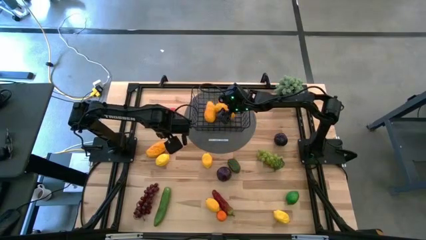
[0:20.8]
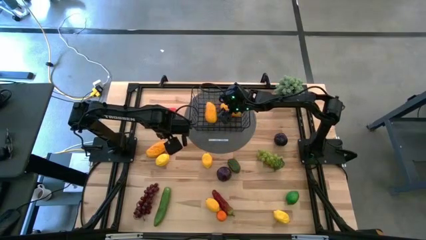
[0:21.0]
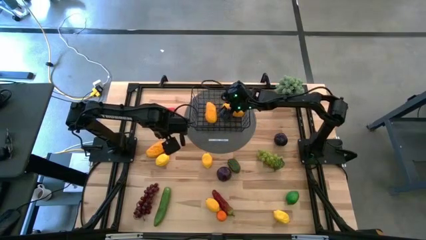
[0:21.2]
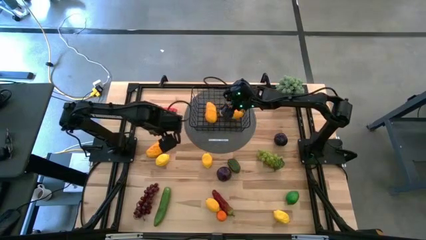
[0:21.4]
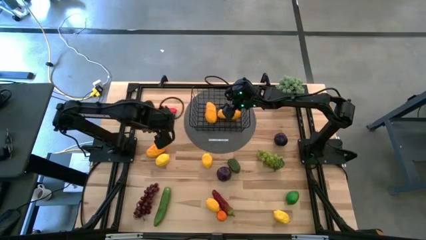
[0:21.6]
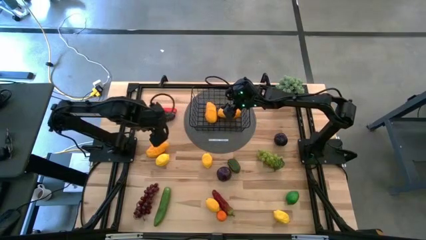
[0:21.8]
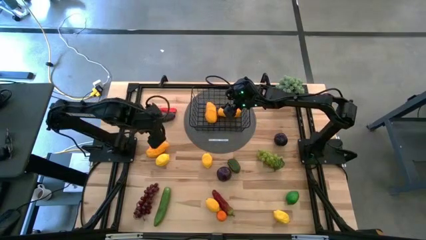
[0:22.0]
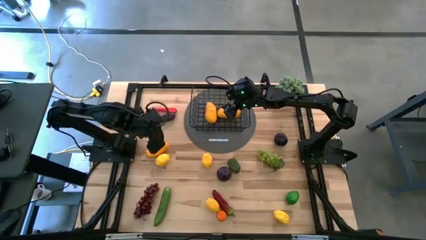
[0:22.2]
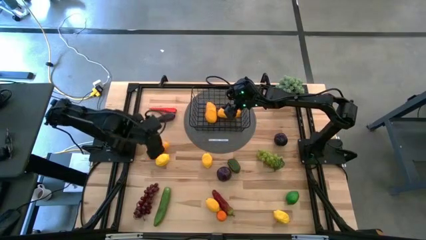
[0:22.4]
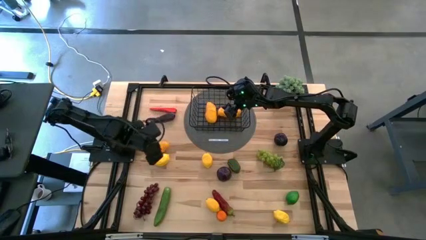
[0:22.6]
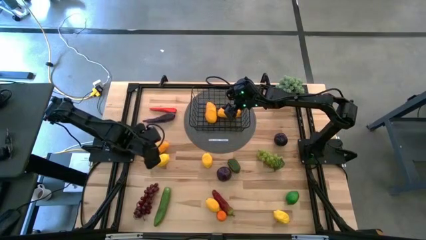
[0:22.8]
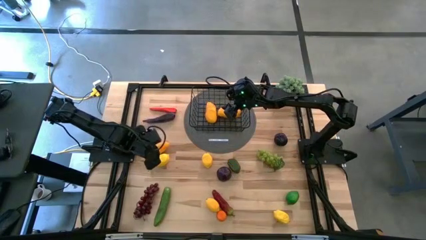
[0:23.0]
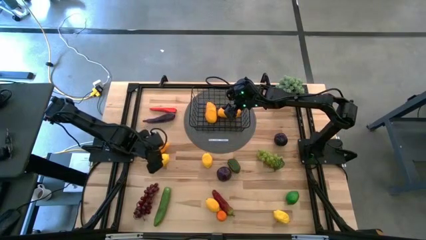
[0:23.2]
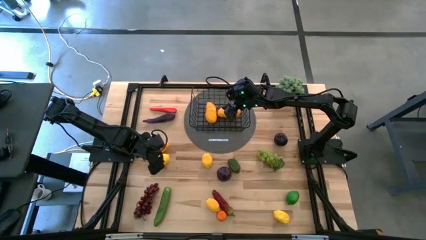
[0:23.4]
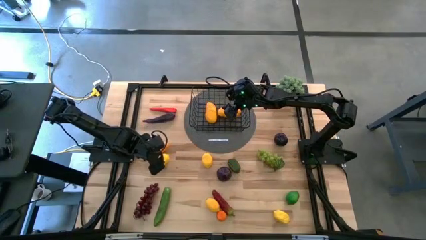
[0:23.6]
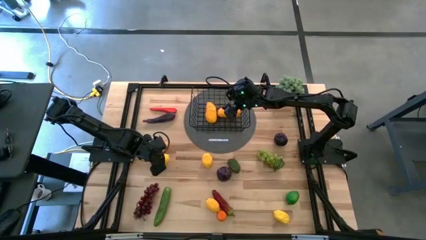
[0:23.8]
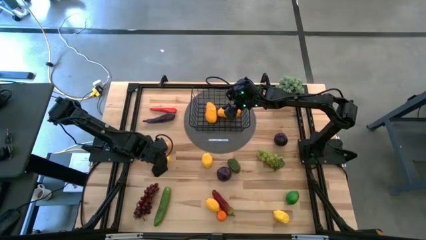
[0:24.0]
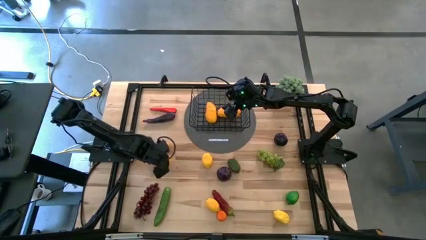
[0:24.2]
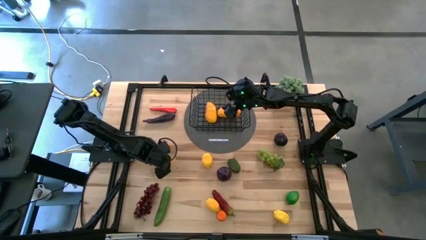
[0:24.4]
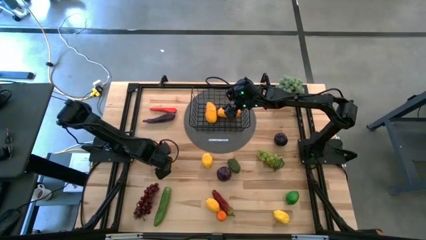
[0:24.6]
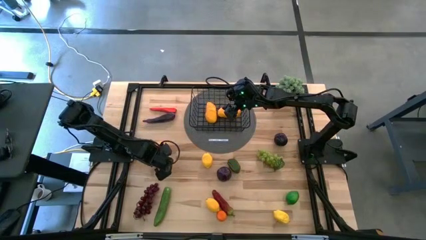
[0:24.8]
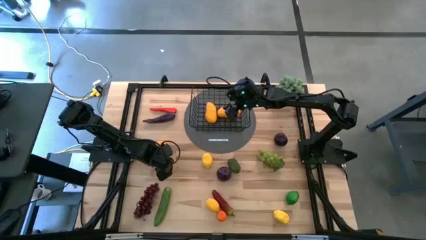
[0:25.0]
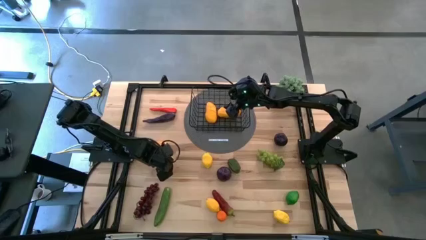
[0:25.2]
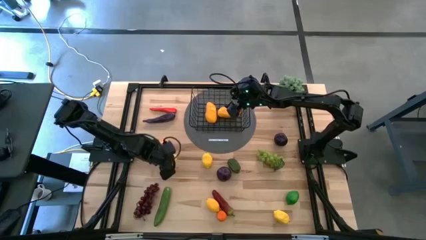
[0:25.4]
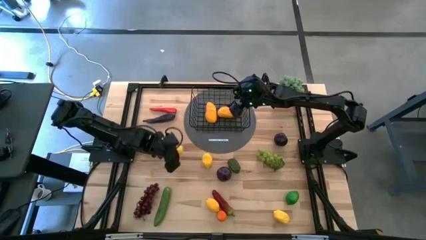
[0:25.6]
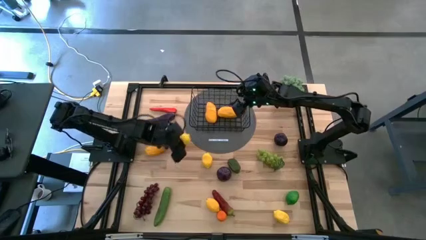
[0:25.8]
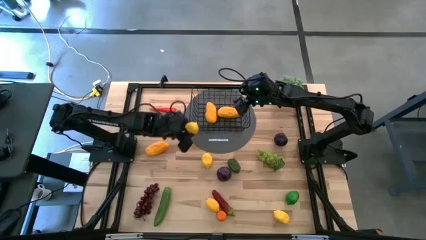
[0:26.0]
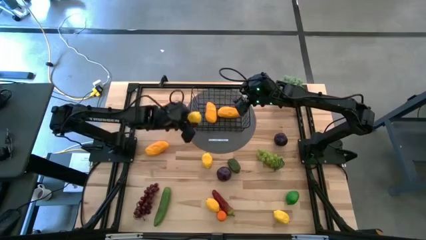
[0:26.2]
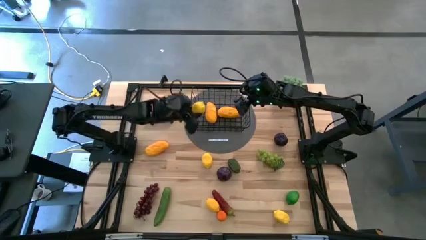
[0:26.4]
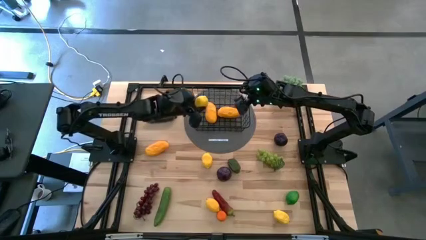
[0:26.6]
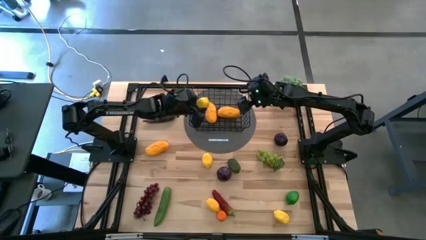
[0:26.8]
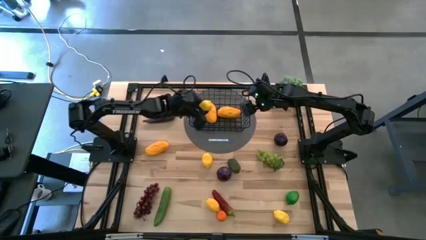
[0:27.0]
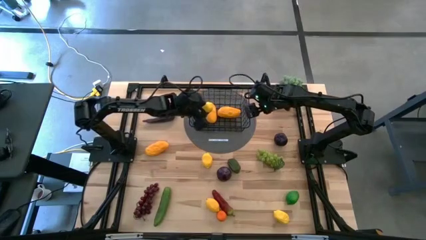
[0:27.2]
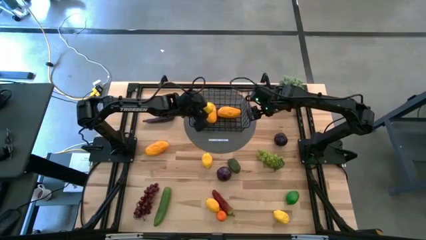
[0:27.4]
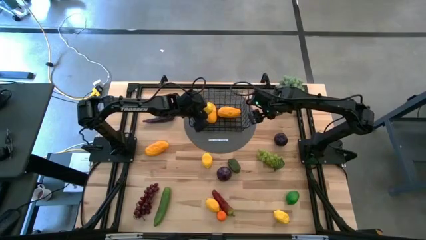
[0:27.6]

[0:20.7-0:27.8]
Task: Build produce basket
Put the yellow lemon into the black wire basket

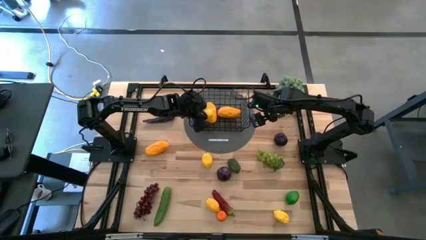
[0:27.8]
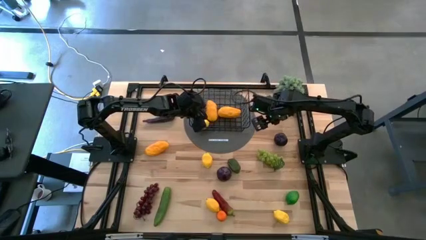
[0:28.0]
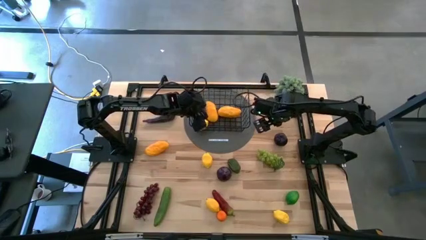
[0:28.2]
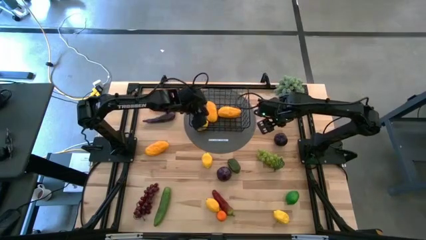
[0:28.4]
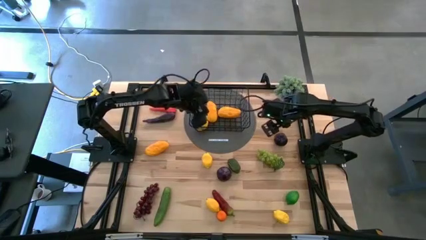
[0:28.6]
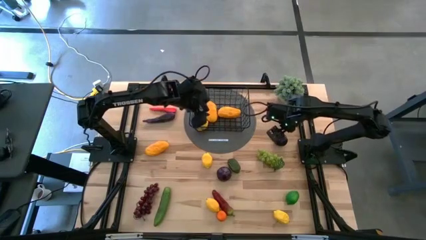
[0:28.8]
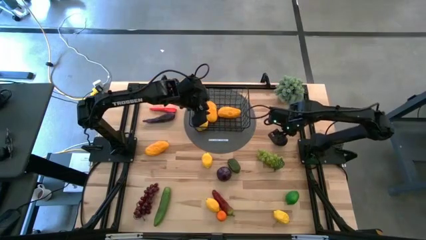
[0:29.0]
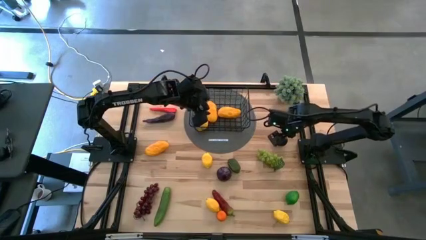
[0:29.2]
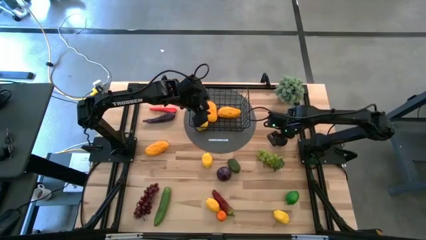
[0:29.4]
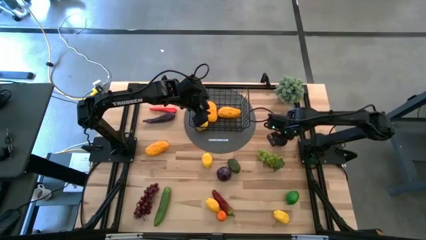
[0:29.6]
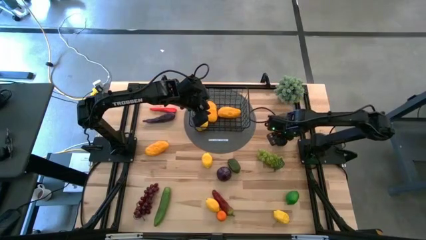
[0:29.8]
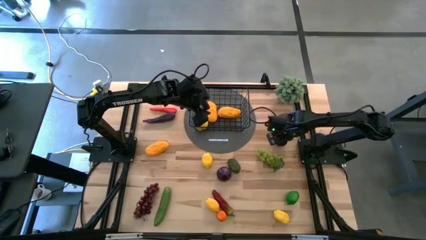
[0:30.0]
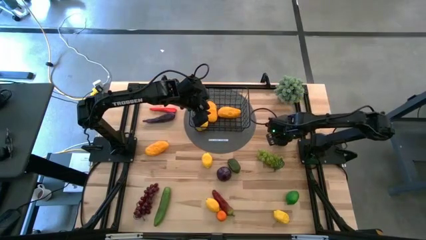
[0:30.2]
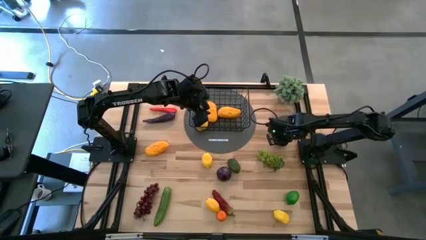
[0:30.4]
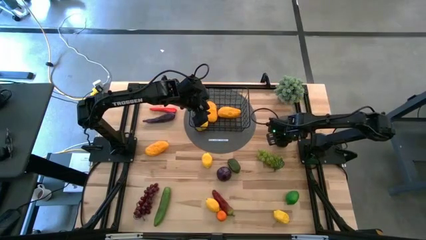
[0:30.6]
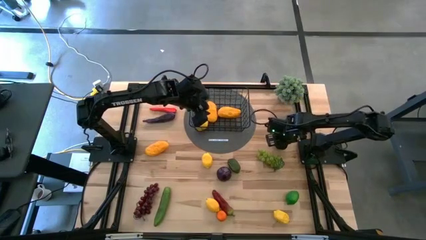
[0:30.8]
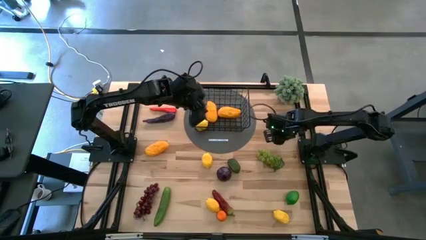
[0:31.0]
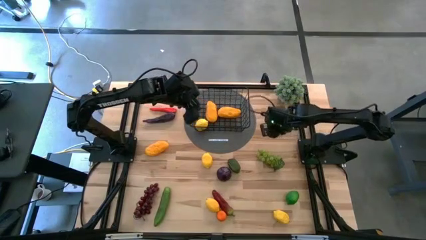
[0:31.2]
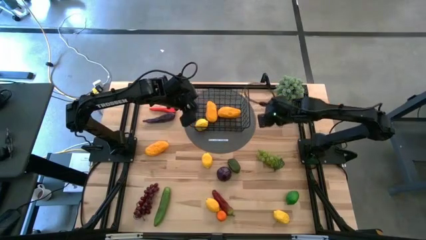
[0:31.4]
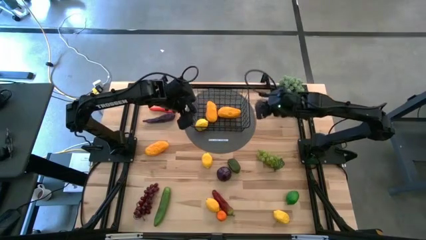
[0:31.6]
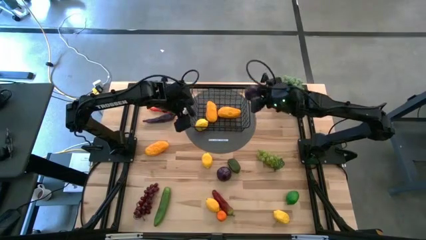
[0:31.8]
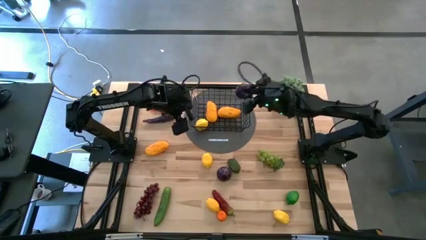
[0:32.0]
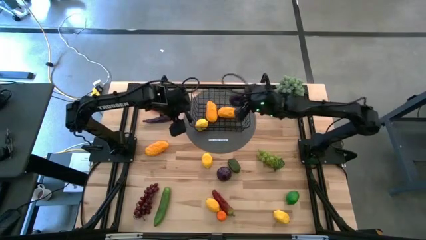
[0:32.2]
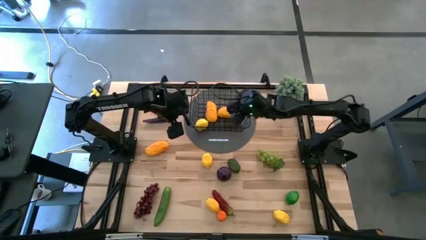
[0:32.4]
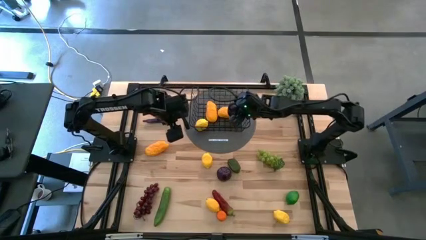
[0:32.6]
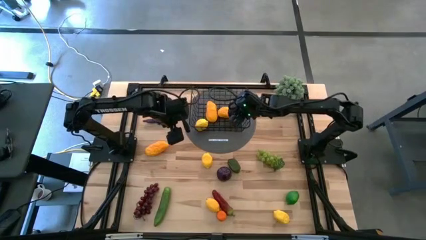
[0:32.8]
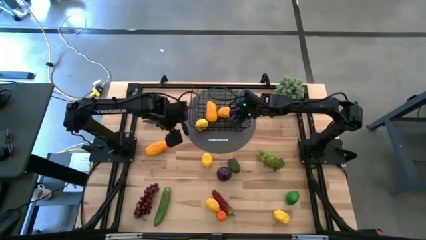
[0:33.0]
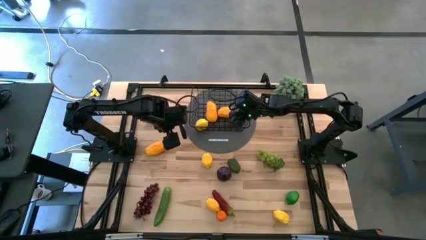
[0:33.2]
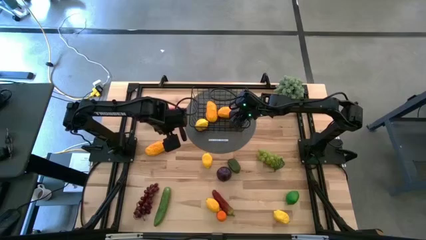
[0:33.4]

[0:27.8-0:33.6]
Put the purple plum into the black wire basket

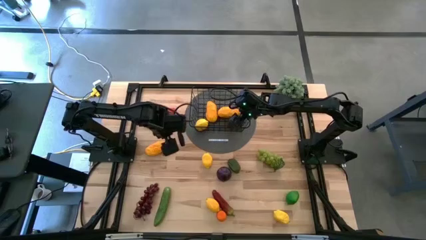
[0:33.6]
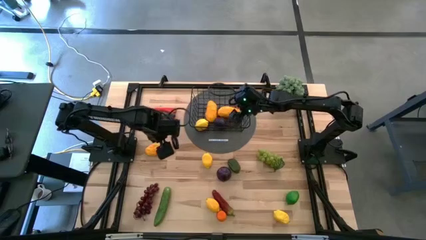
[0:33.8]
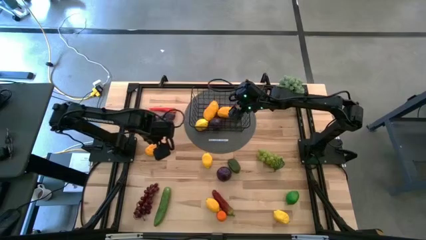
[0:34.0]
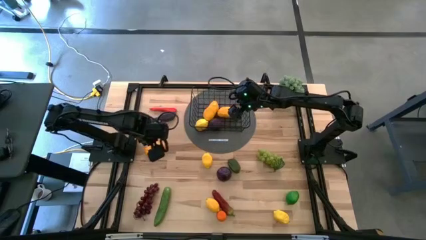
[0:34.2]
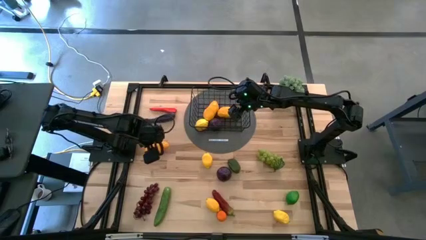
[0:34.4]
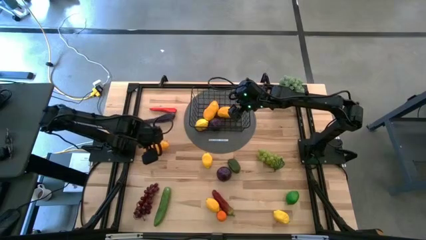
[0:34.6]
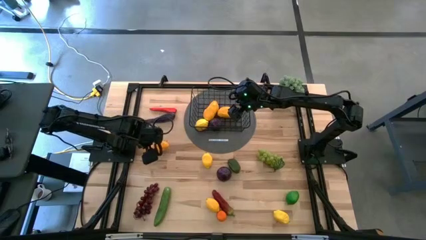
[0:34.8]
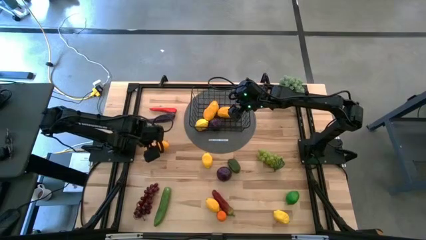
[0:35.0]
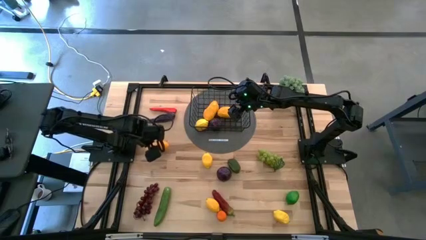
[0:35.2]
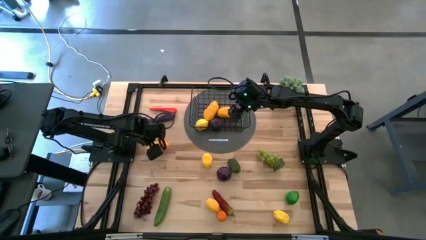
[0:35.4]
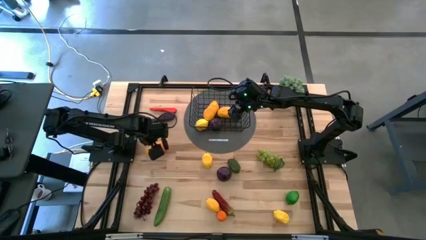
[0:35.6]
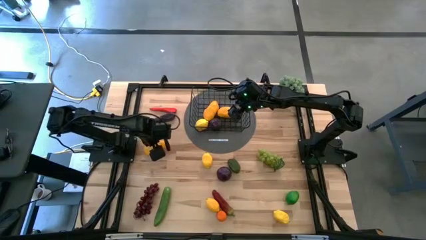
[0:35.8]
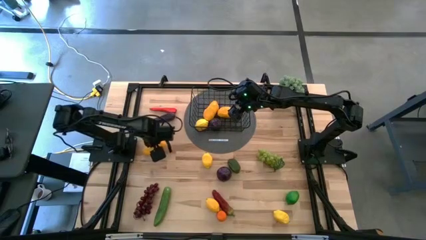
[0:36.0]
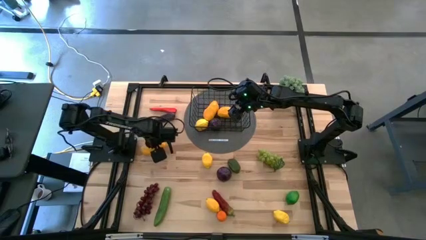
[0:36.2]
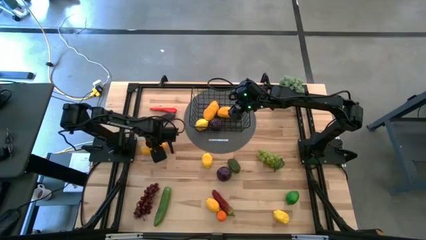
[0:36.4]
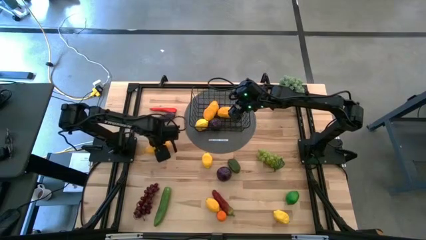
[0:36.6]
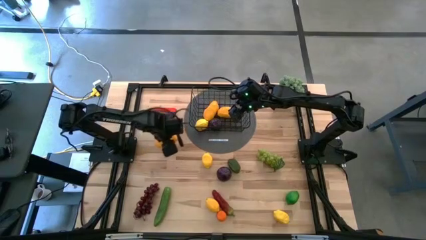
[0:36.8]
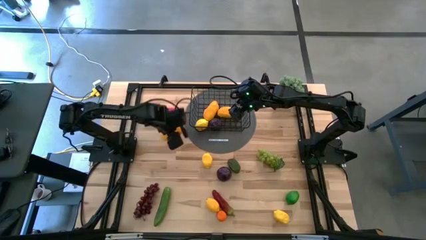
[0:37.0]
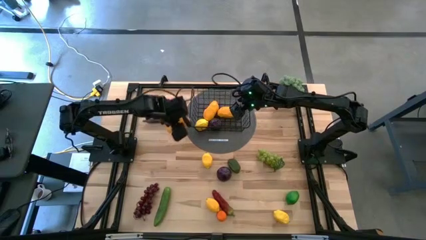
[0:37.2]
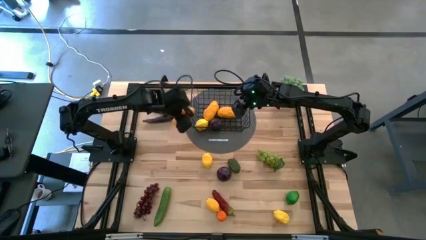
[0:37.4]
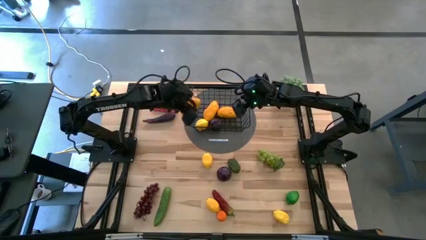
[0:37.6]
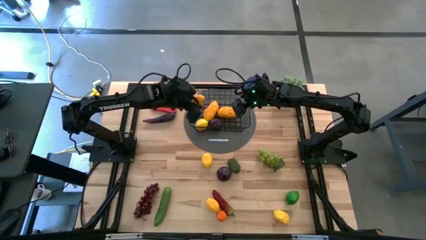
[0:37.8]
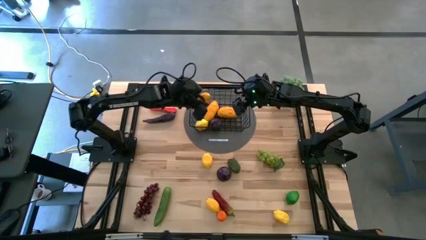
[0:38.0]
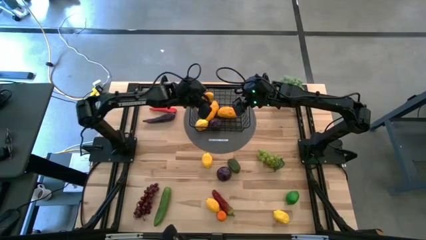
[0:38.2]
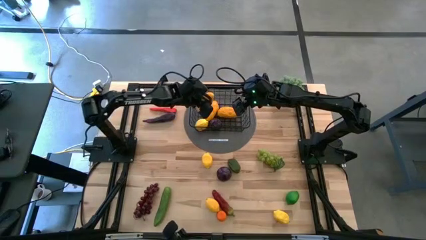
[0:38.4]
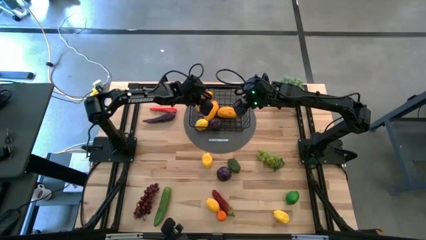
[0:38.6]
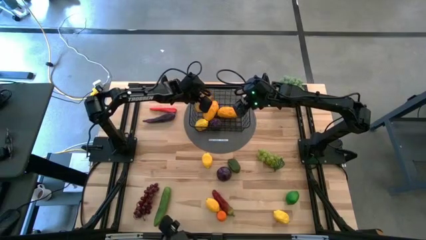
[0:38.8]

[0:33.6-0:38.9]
Put the yellow mango into the black wire basket

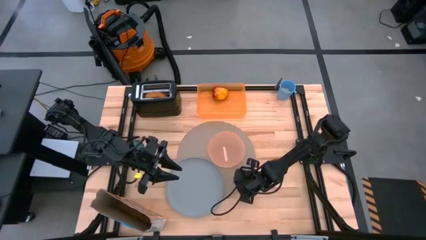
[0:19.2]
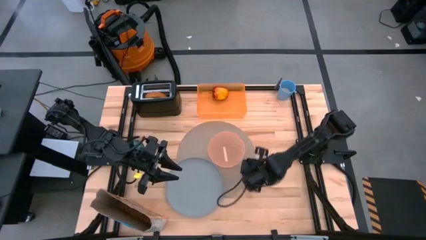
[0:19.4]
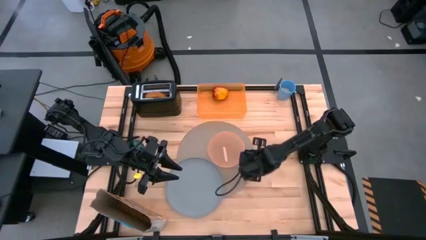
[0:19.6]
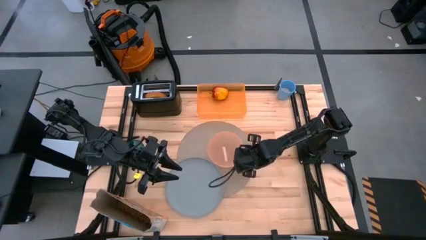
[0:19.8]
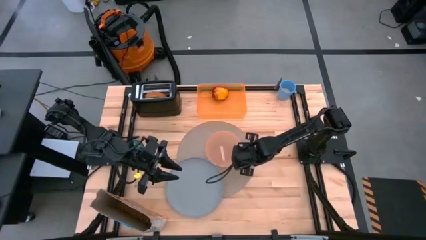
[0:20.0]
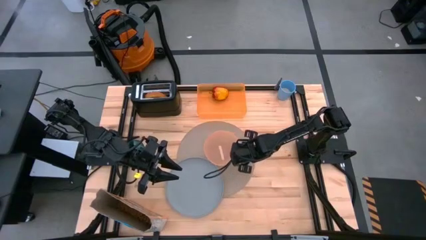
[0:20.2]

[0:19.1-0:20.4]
Task: Arrange a breakfast setting
Adjust the pink bowl on the gray placemat
